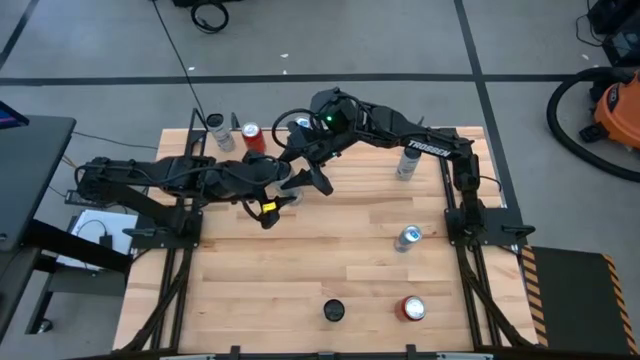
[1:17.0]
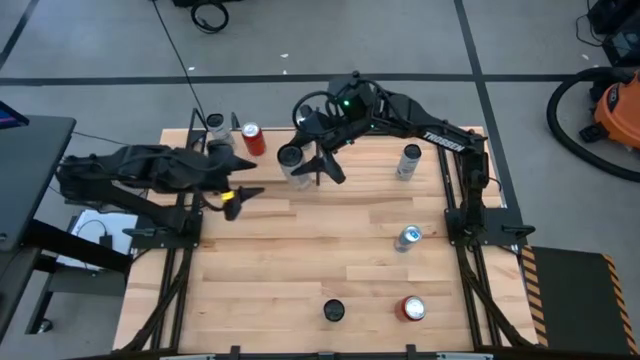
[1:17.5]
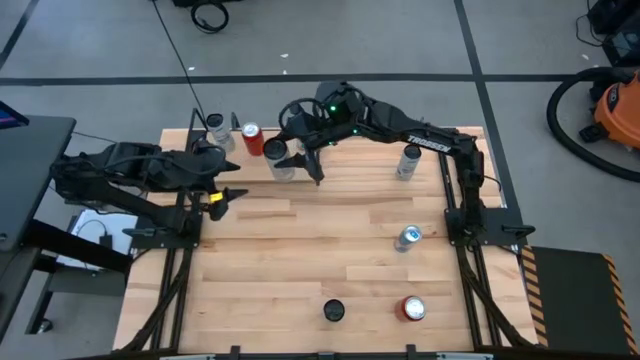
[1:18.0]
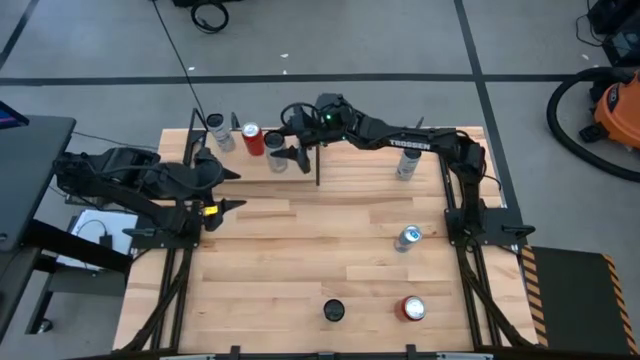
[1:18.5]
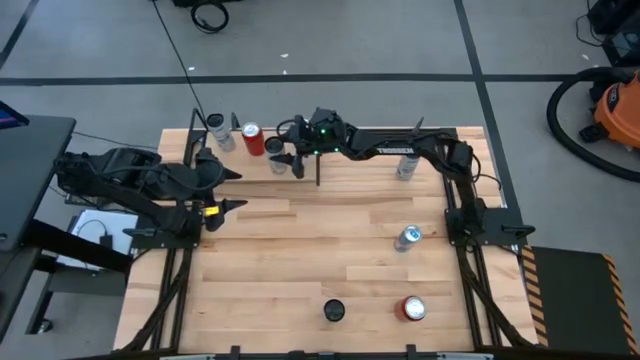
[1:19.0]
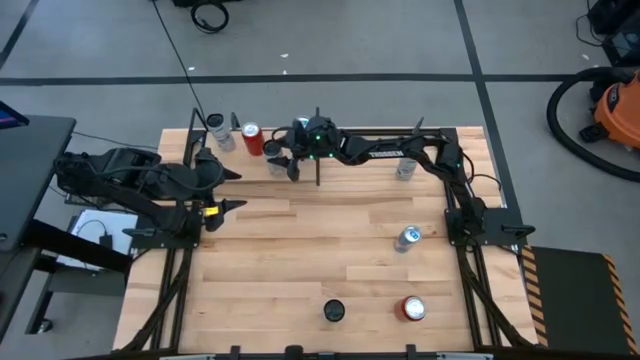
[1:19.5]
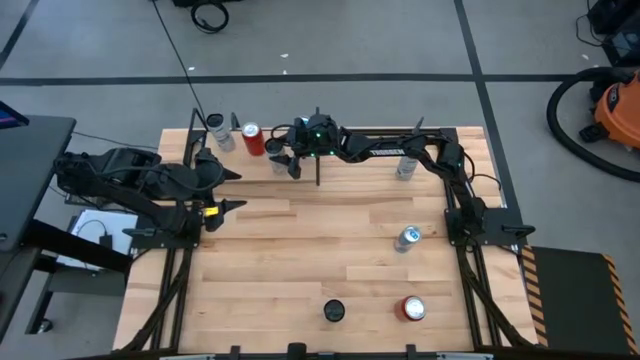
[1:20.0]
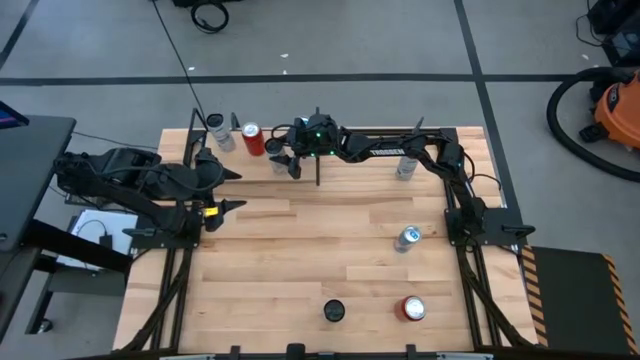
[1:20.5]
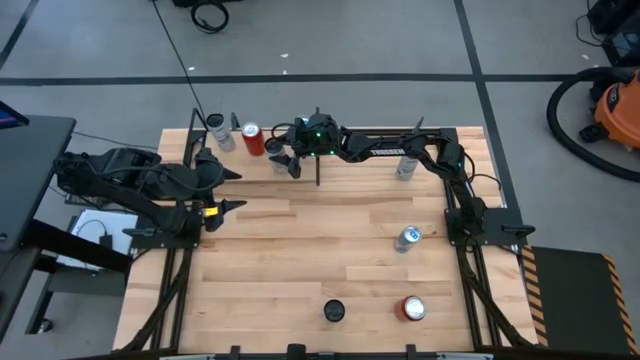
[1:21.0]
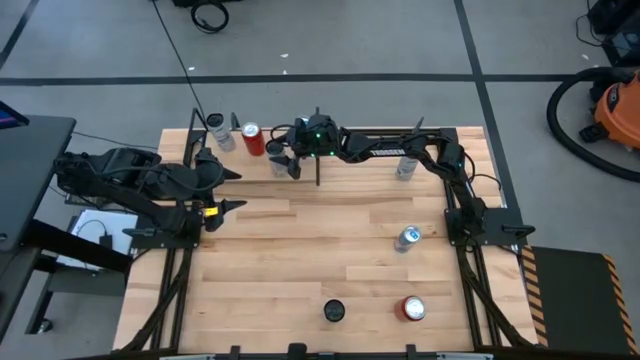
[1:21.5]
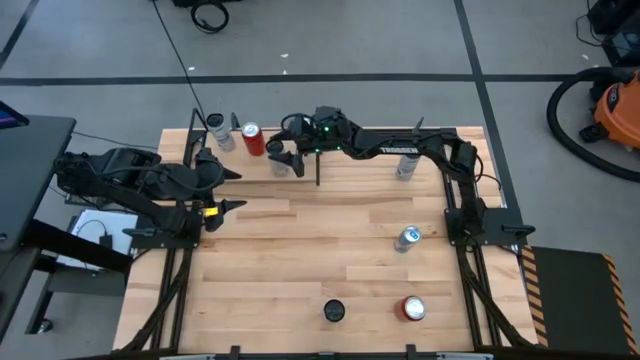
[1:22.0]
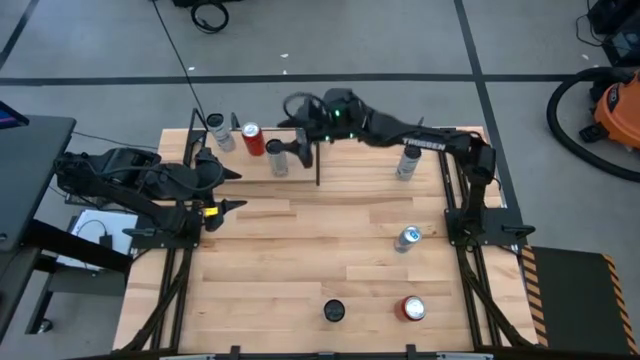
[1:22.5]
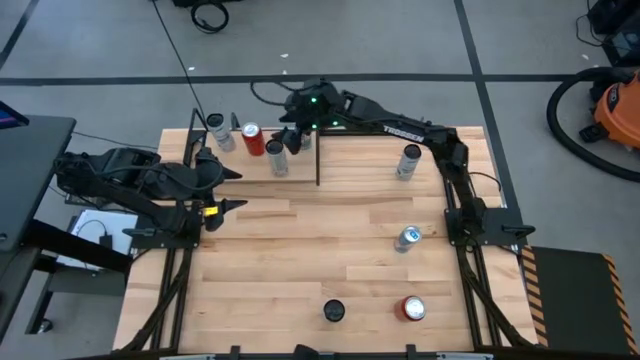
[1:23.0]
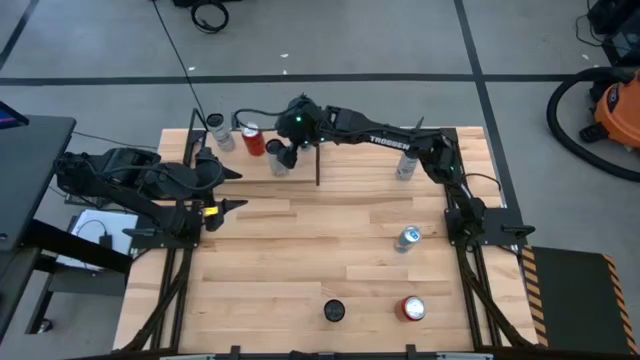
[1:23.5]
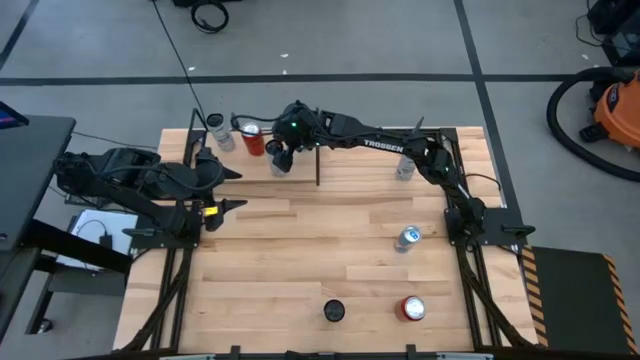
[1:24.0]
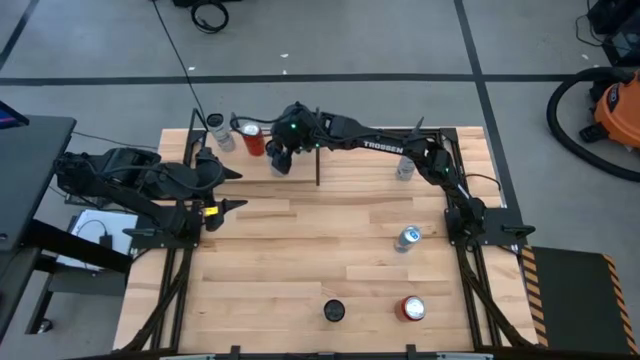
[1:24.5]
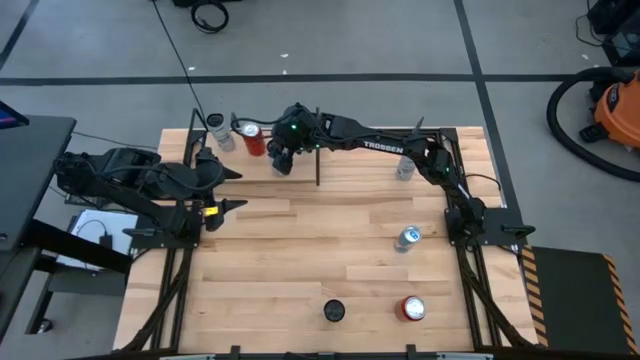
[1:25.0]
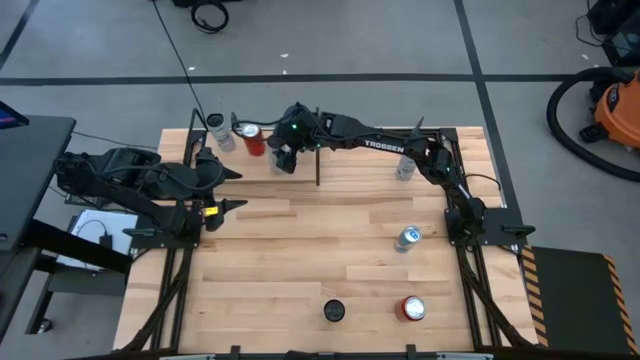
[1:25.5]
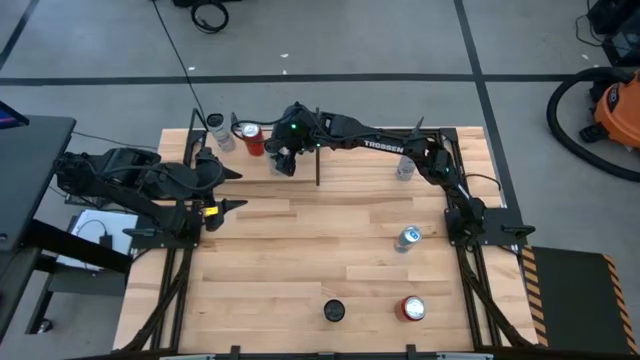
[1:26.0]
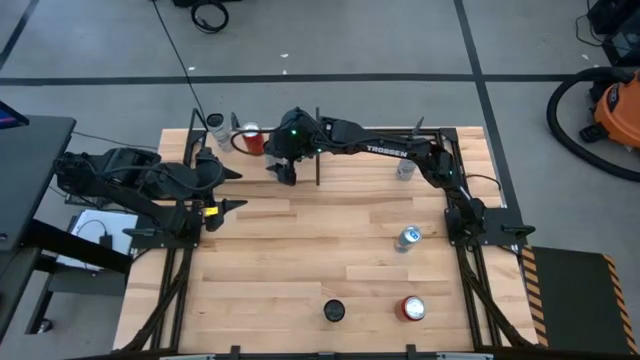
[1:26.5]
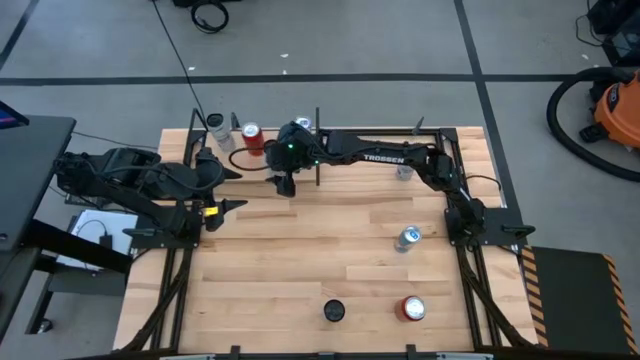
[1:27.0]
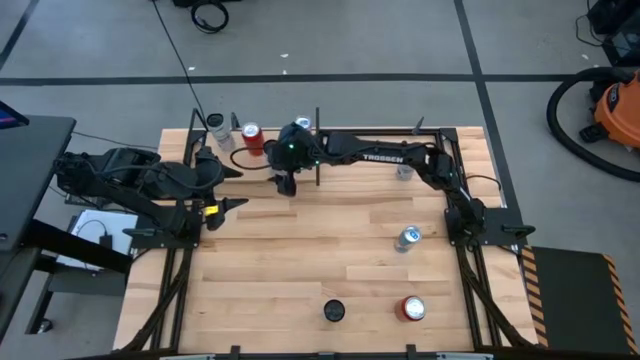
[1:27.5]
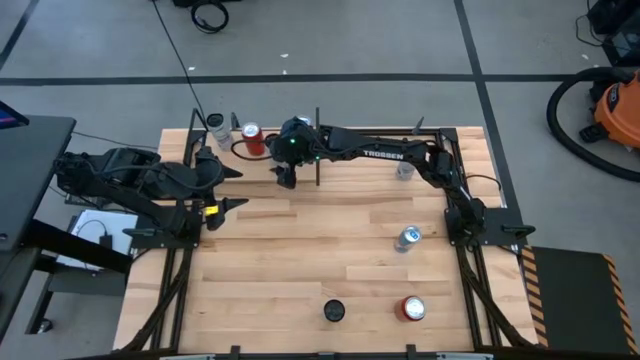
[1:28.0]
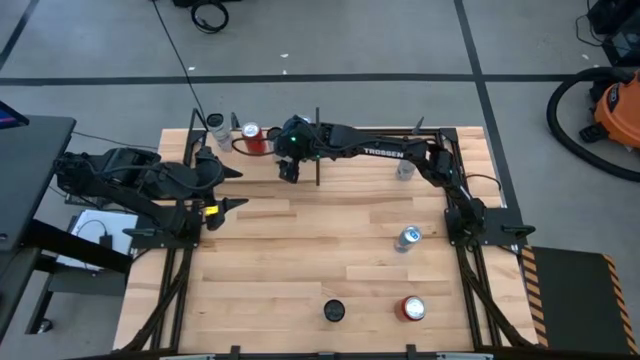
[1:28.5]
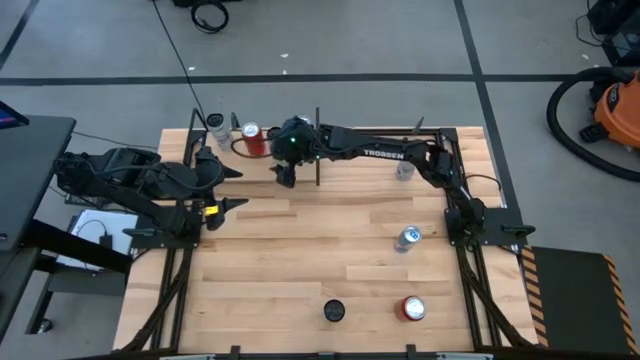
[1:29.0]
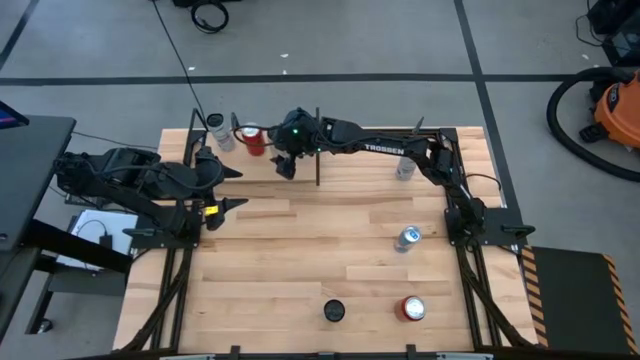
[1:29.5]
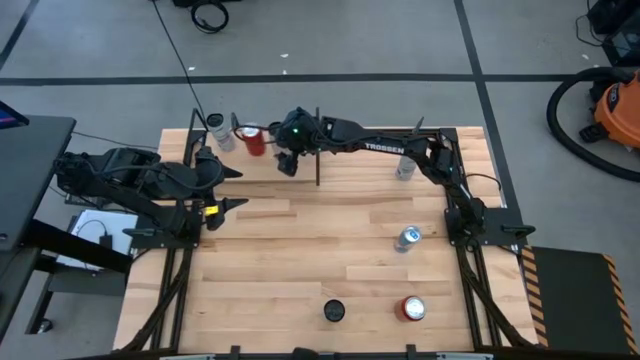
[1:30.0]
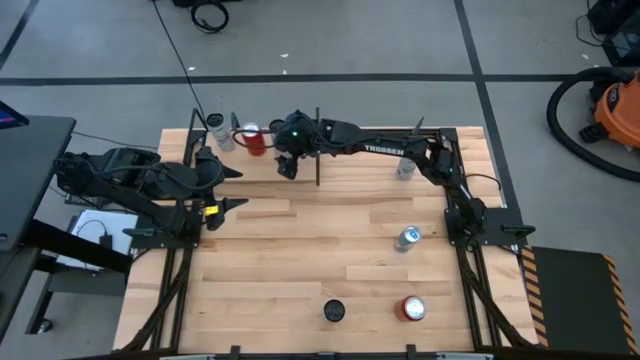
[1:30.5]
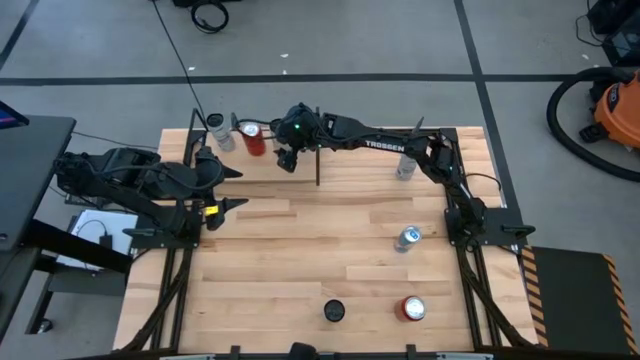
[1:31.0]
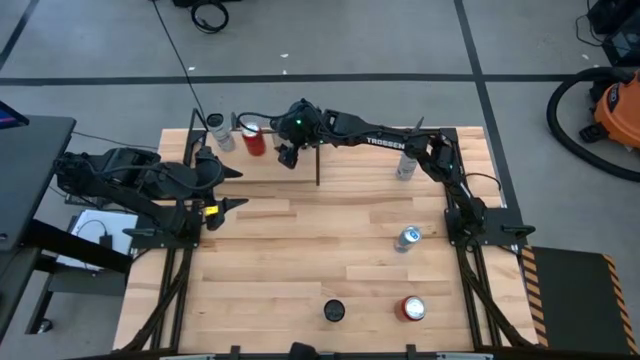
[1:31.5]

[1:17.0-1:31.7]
Task: Place canned beverage on shelf
Put the white-yellow soda can on the shelf
